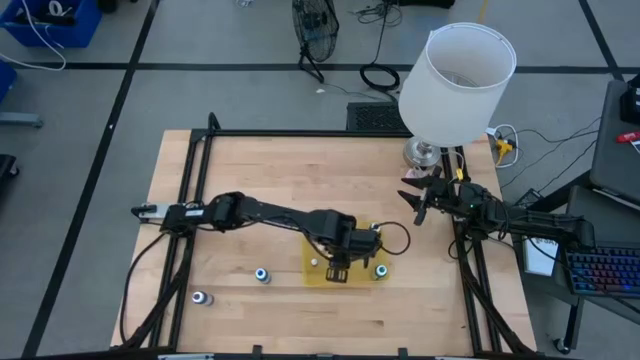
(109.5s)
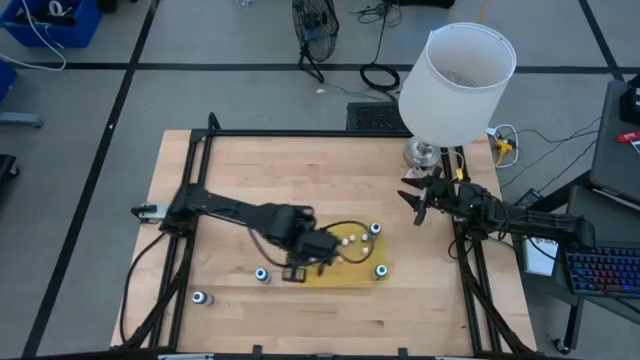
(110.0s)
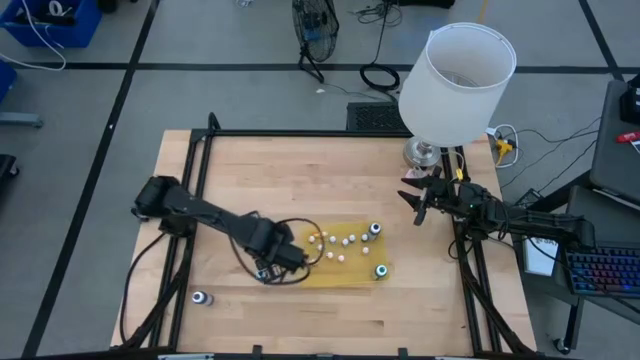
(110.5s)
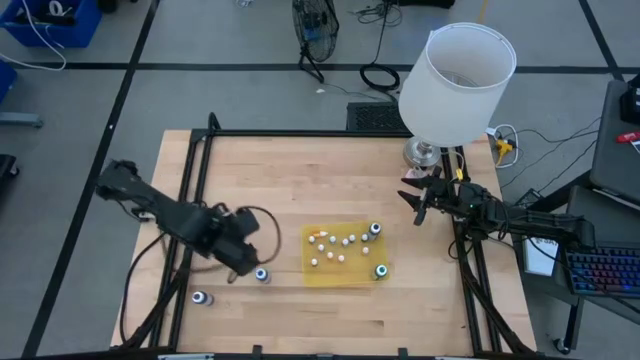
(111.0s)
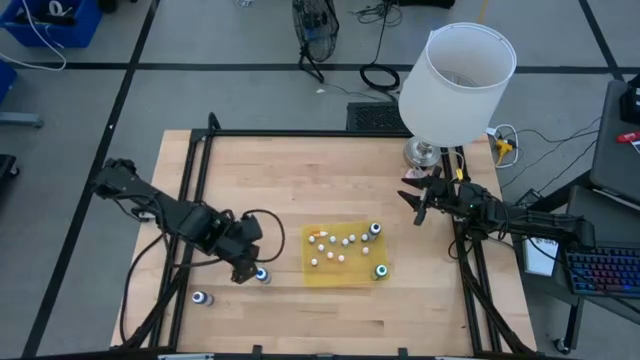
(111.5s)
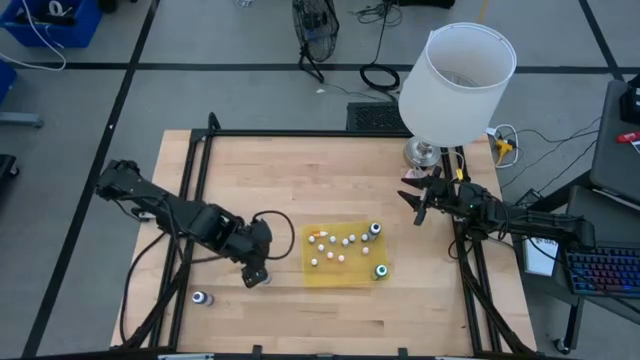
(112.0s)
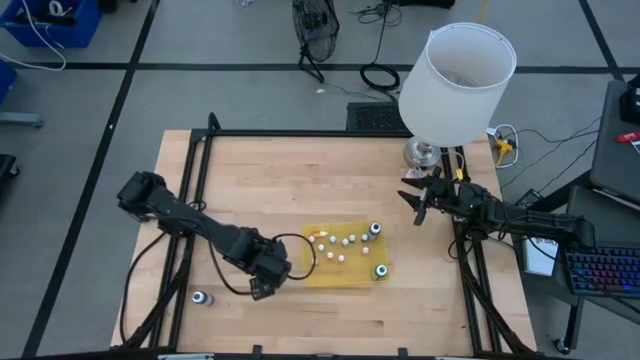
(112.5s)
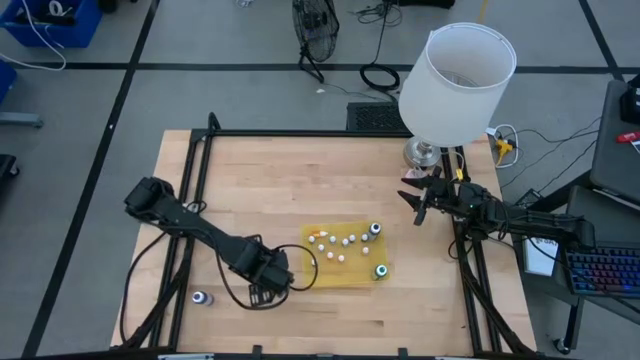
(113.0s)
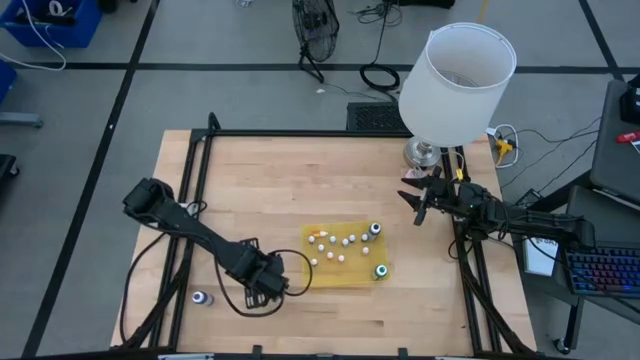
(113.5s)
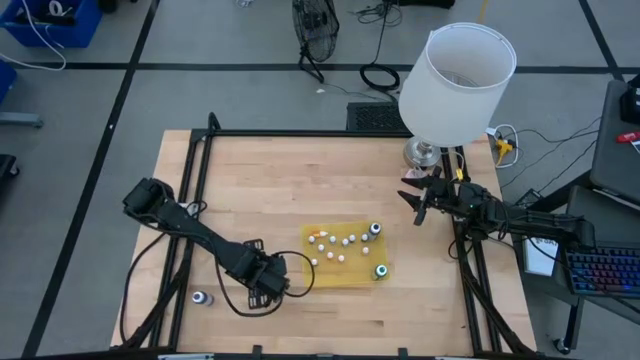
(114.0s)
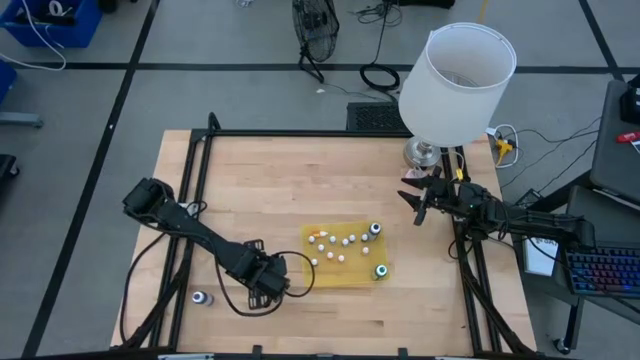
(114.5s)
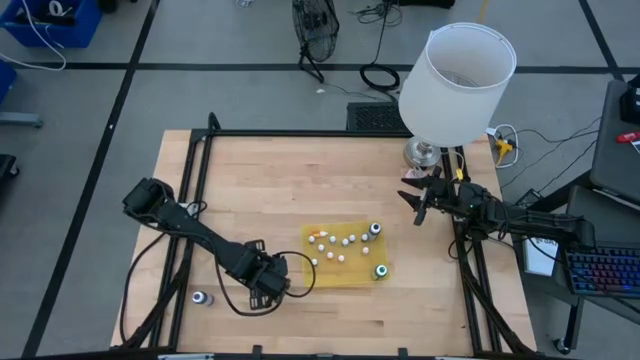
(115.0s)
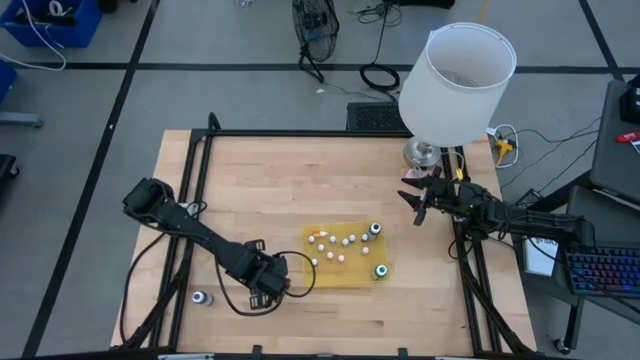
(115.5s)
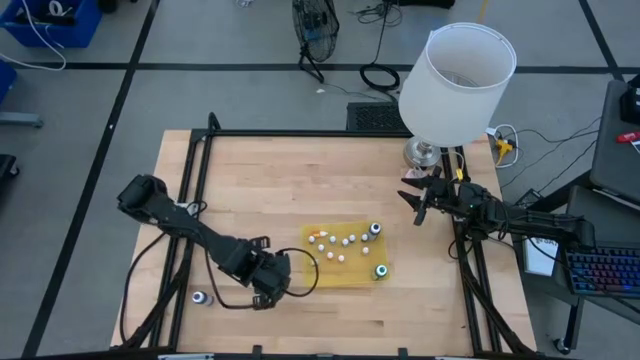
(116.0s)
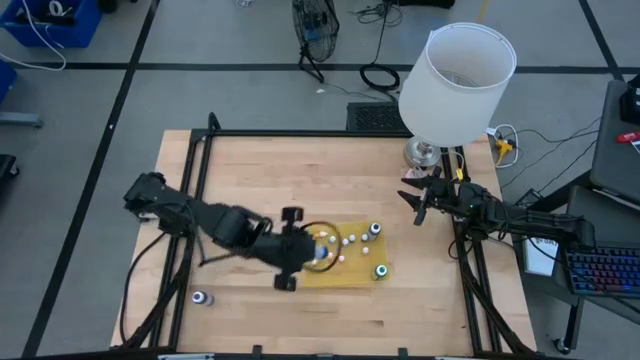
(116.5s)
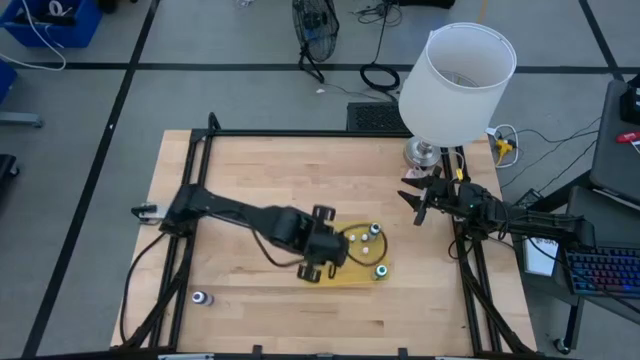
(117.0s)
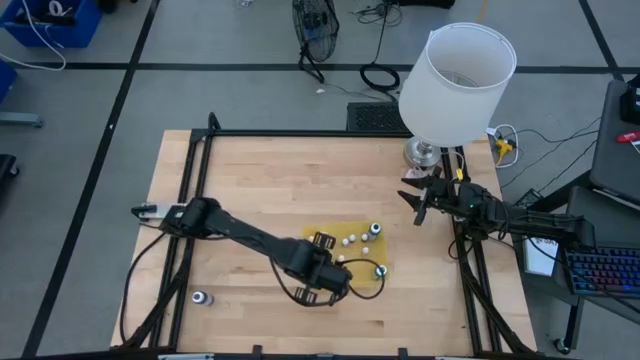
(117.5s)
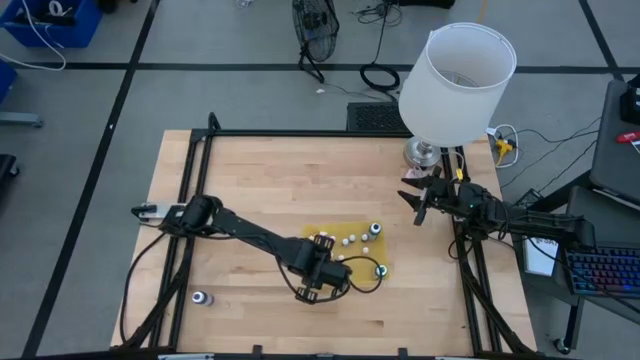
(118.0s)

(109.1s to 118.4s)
Task: Pick & Place food coloring
Put the large blue food coloring bottle into the yellow bin

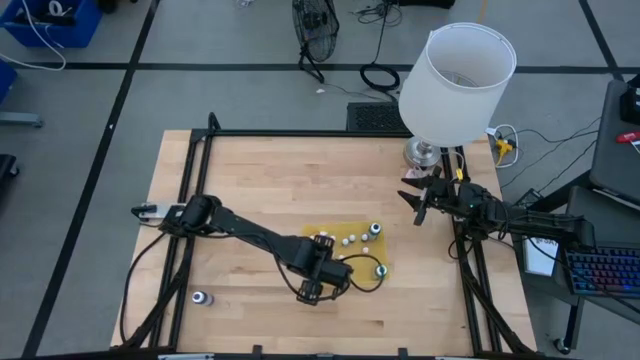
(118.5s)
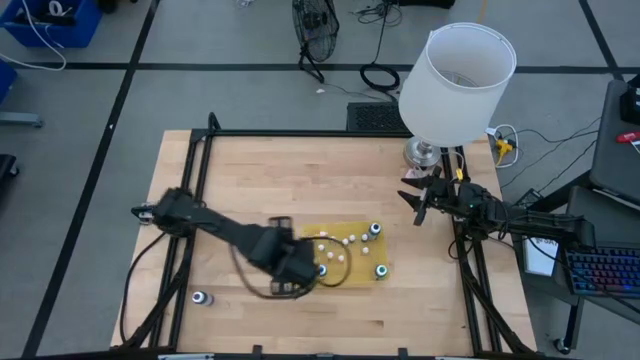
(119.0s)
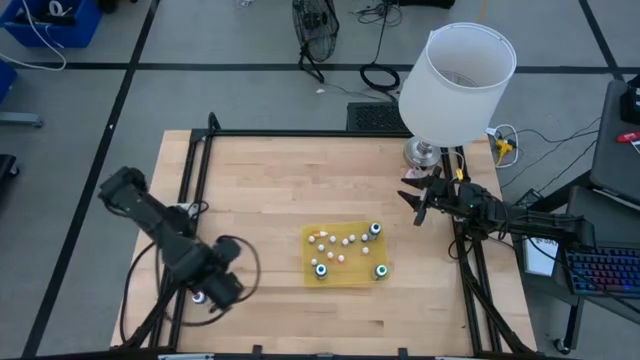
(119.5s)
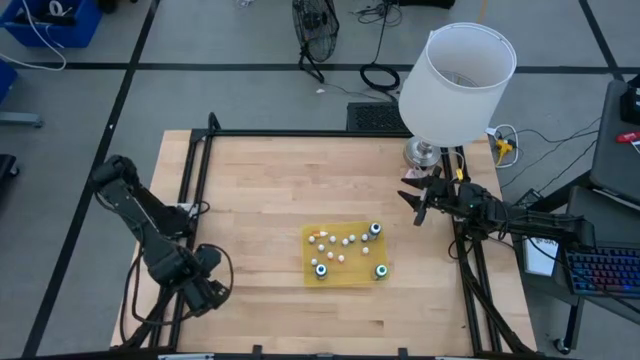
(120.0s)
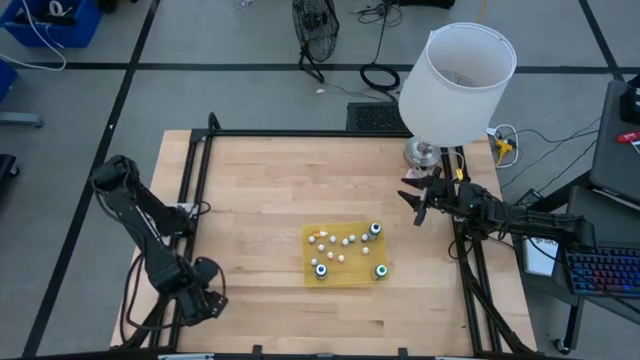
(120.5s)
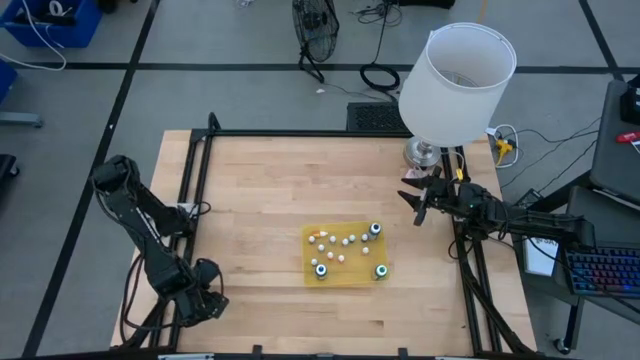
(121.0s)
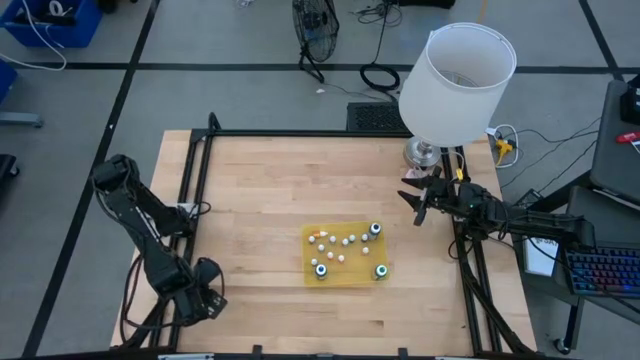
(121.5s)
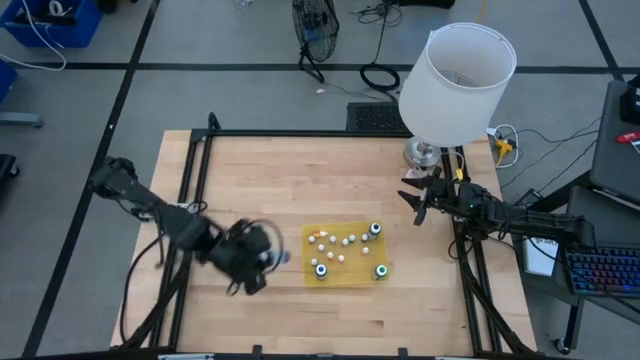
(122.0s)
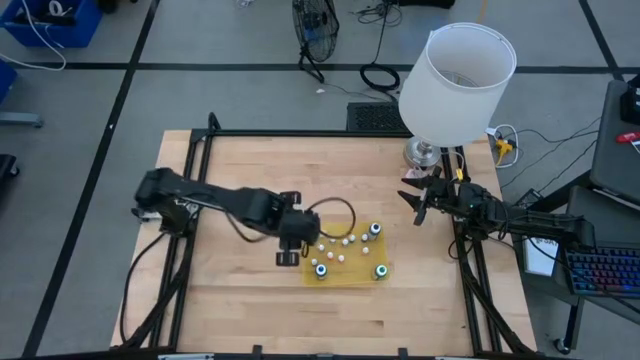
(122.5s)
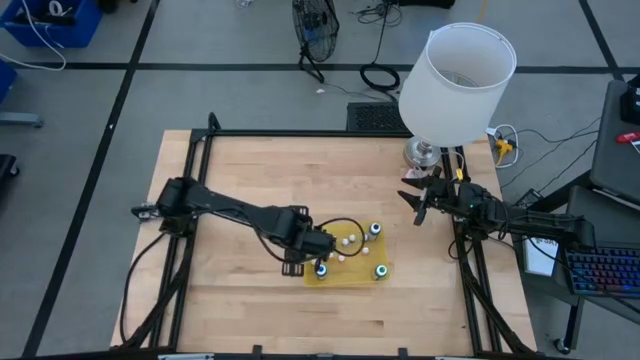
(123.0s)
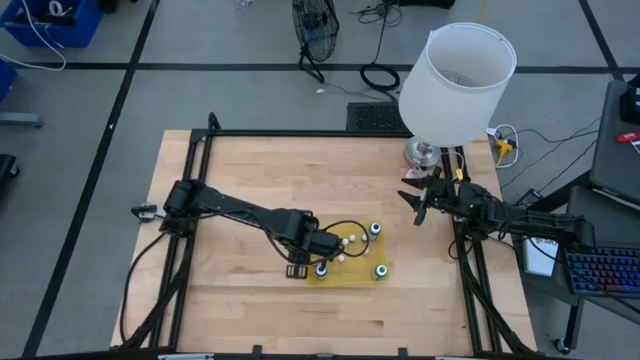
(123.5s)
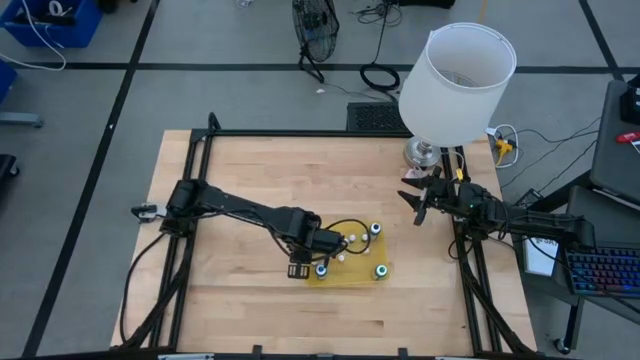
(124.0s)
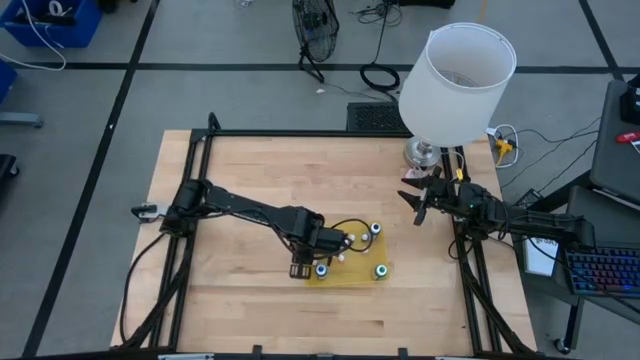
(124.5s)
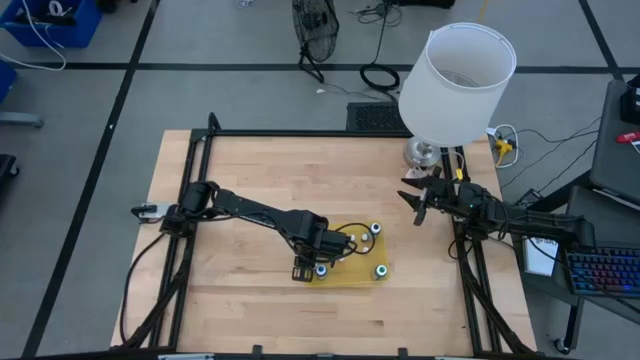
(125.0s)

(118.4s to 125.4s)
Put the large purple food coloring bottle into the yellow bin

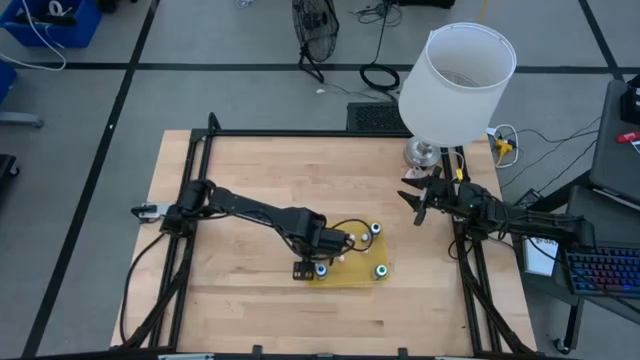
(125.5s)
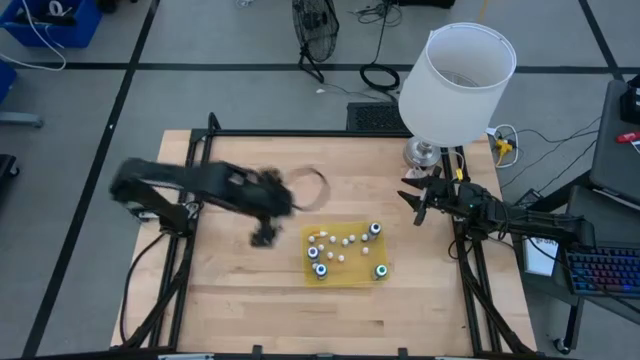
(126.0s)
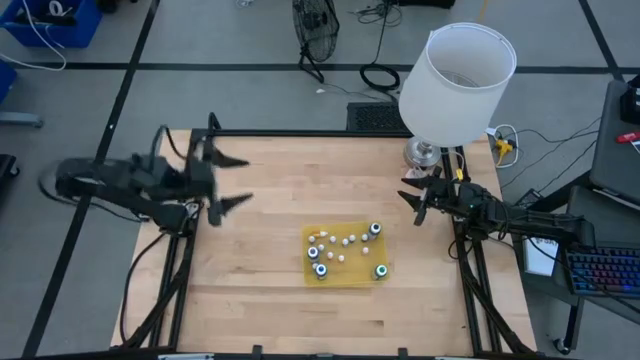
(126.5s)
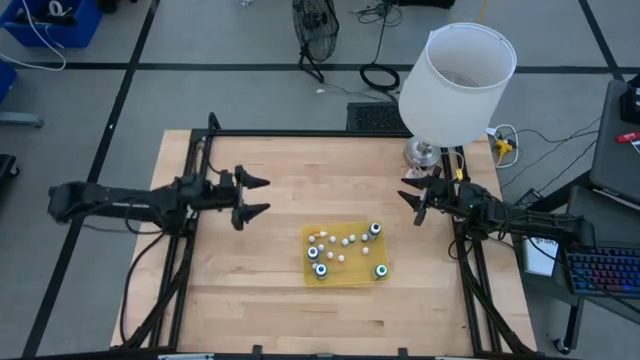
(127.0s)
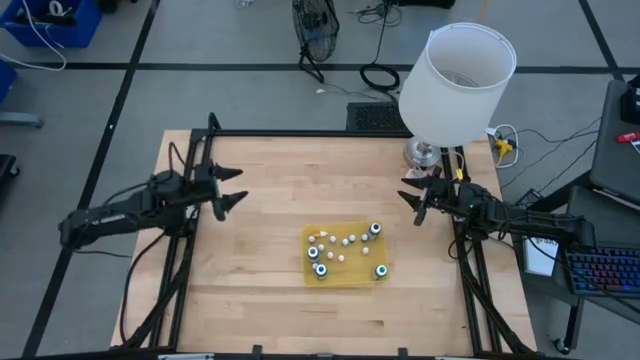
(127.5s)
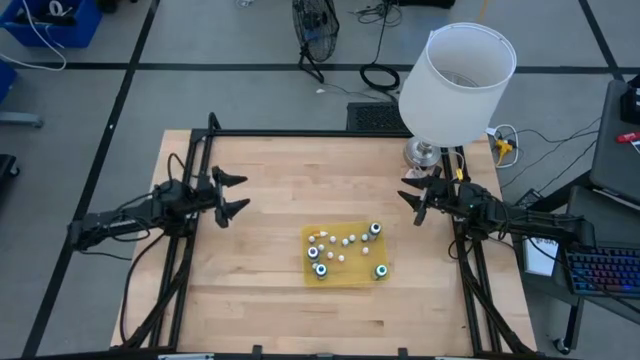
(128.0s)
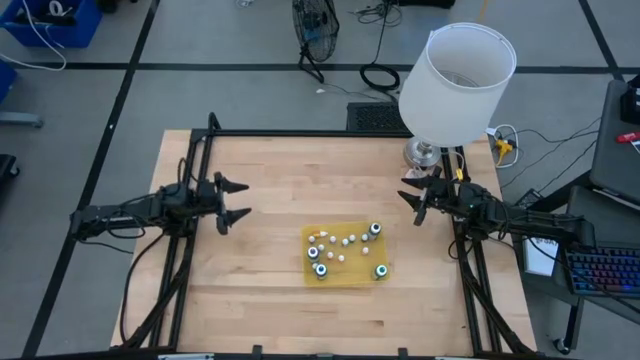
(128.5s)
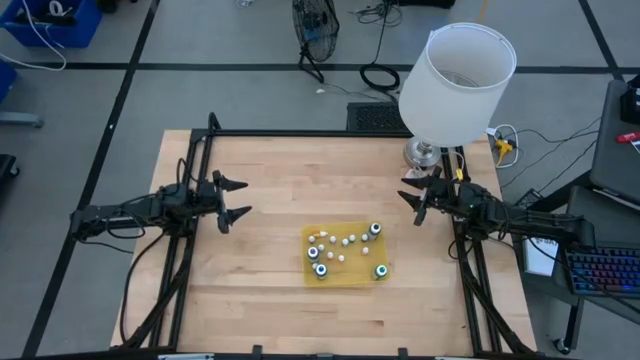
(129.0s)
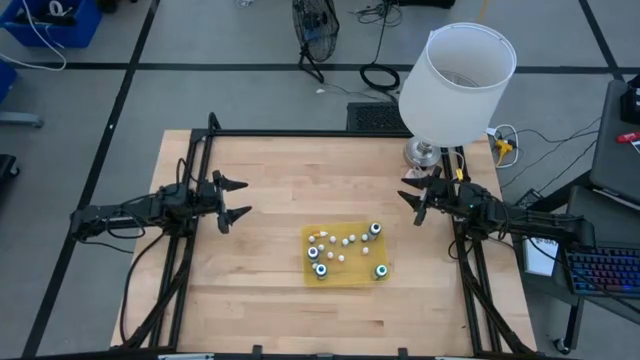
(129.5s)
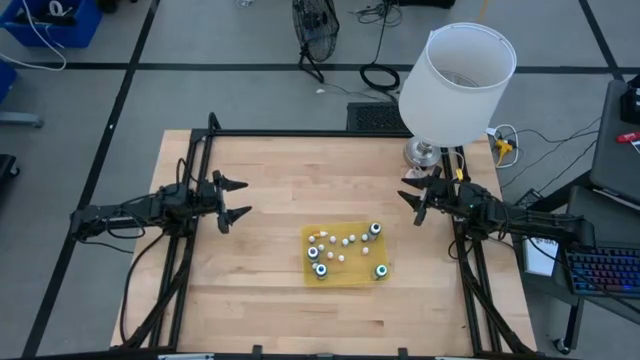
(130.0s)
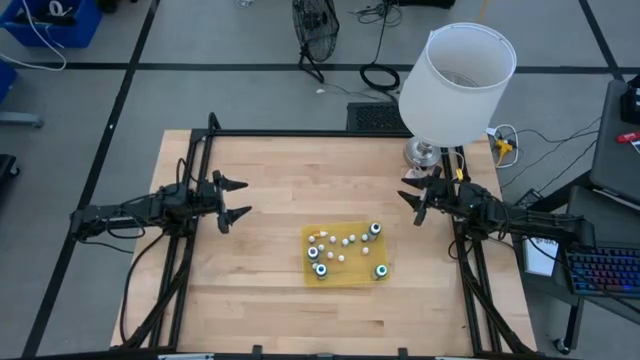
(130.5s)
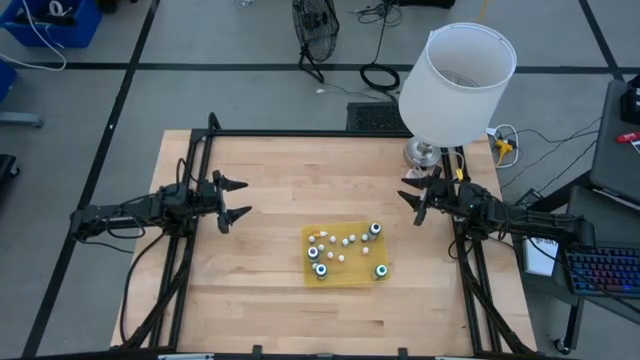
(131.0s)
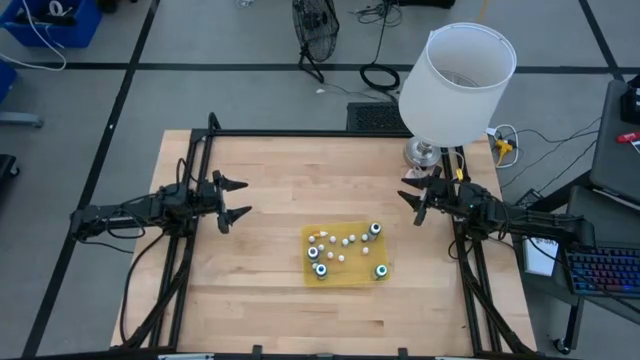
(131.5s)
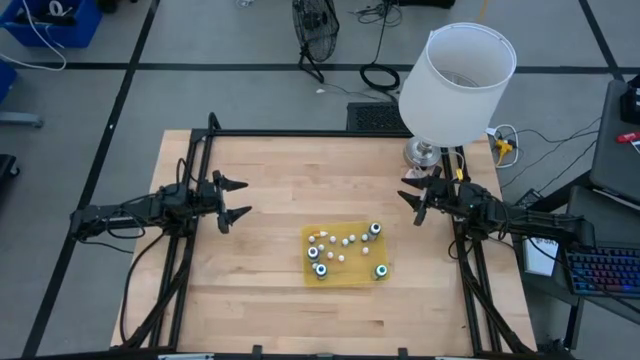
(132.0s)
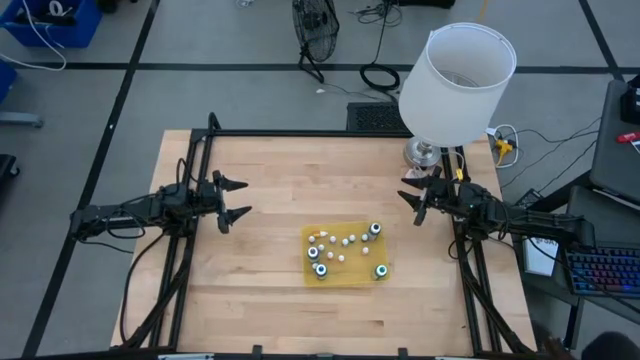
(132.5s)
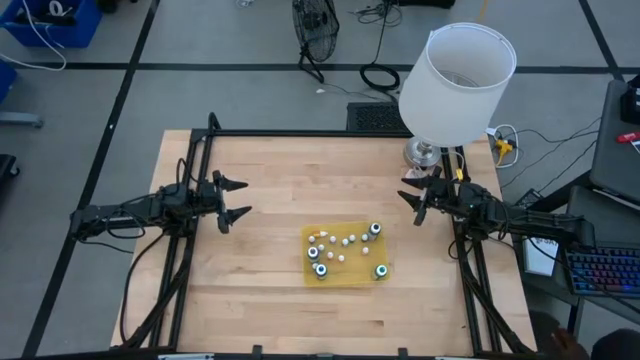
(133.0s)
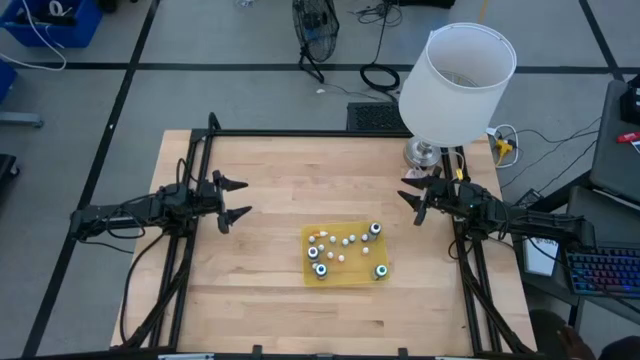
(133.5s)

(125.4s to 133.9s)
Return to Home Position
